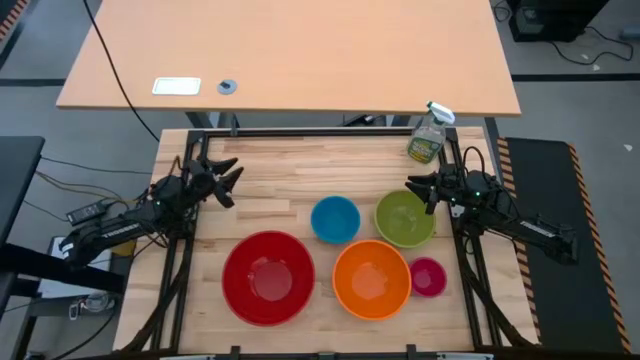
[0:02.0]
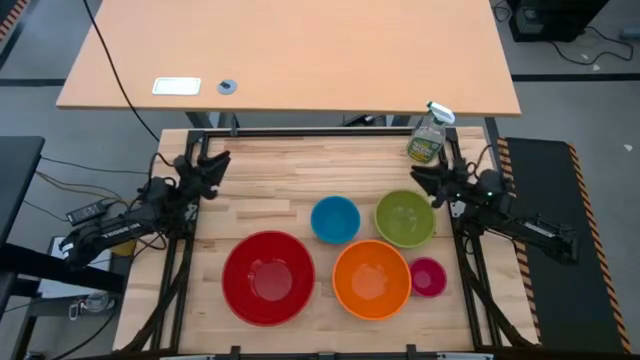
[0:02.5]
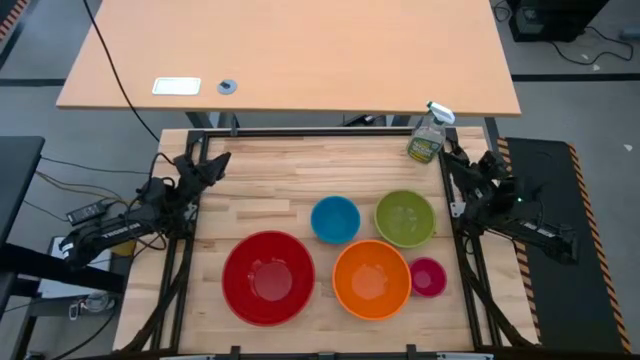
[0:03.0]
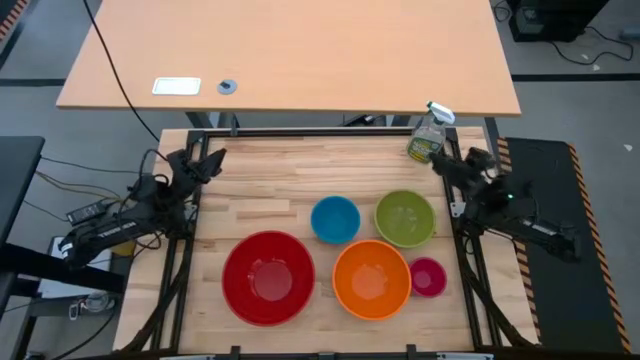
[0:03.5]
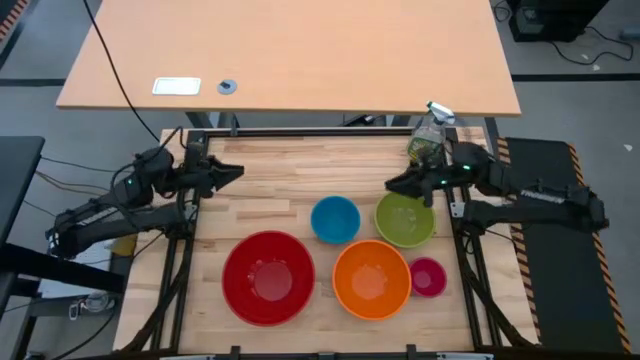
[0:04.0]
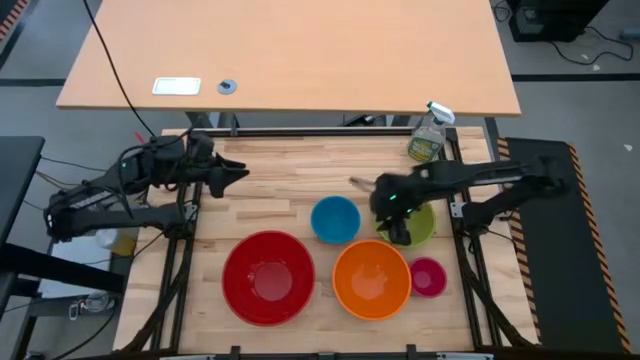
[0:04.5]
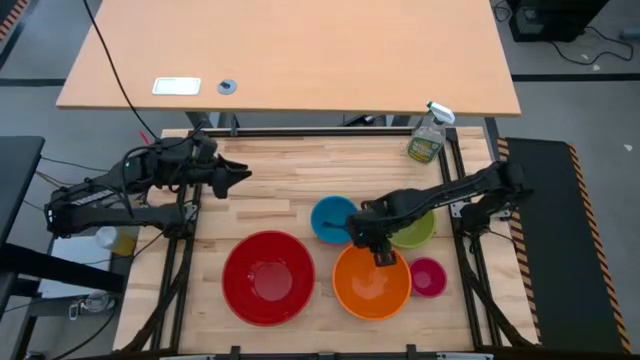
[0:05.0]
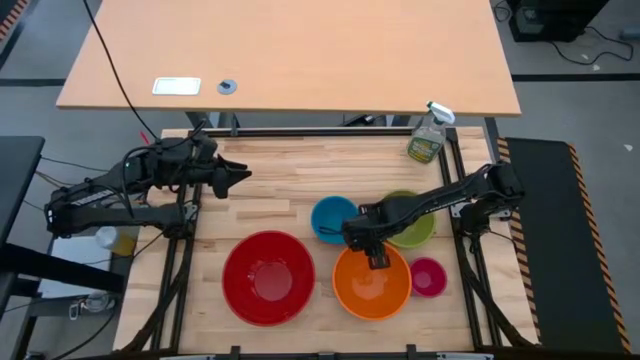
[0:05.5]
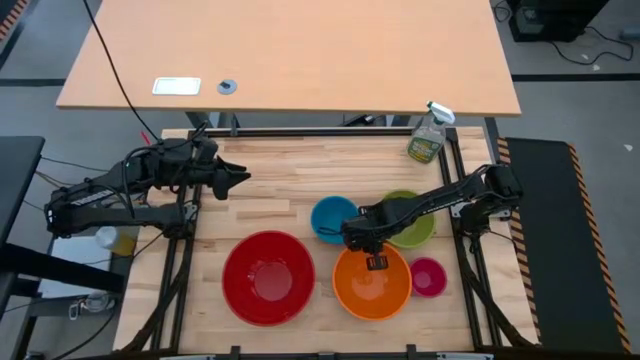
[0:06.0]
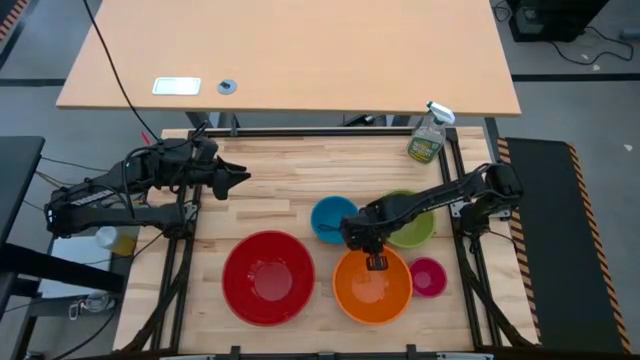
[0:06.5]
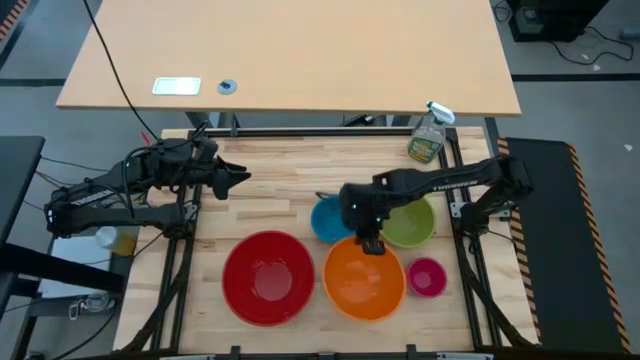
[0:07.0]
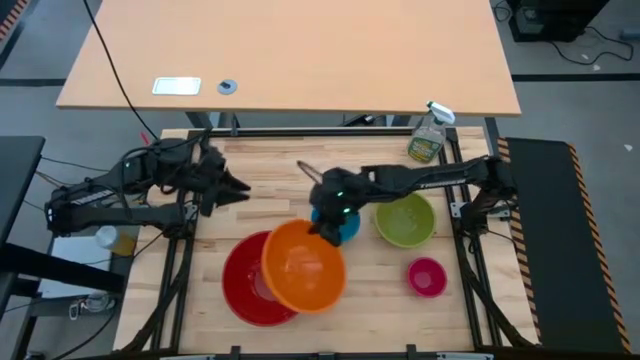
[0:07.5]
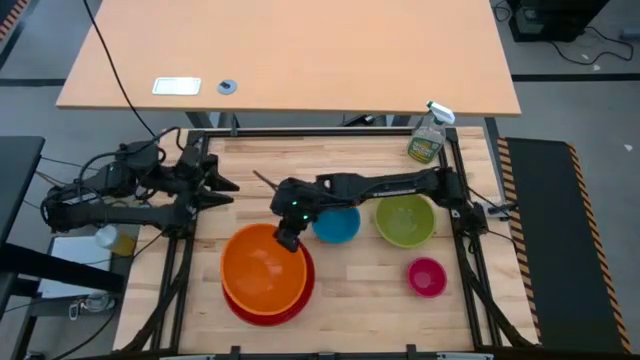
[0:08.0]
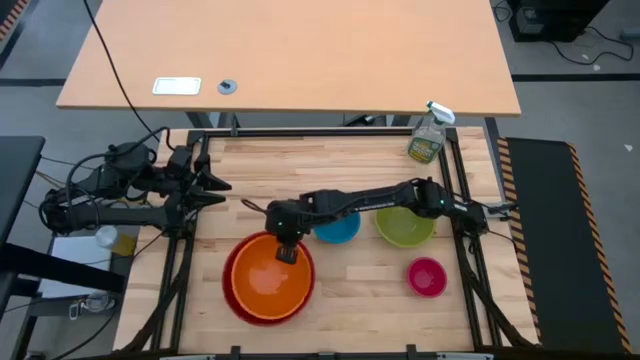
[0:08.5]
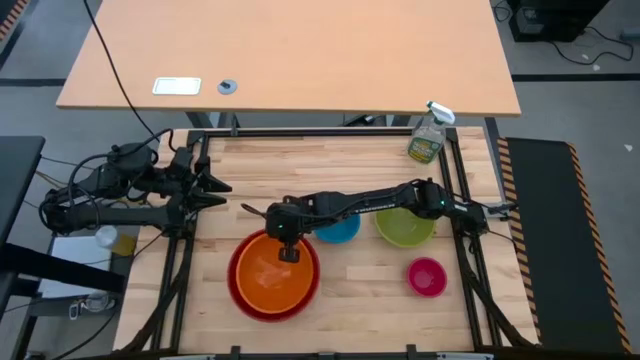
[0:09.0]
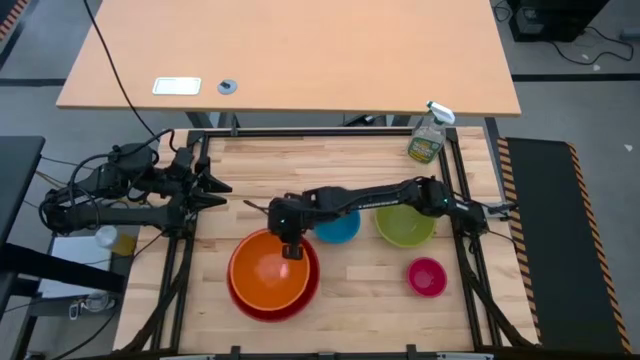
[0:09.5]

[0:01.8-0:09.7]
Stack the orange bowl into the large red bowl

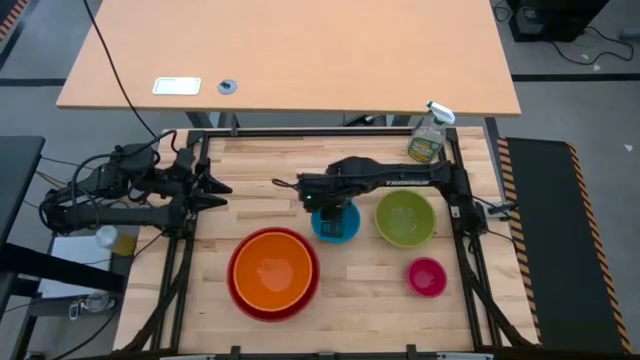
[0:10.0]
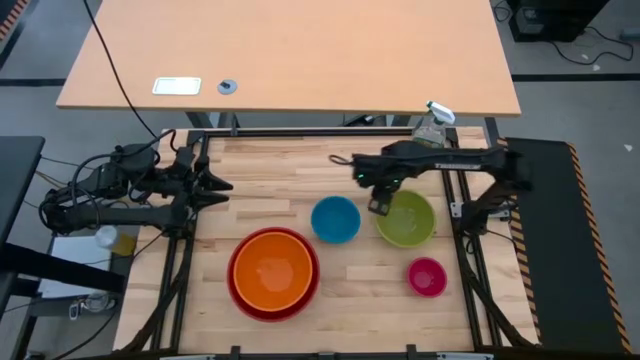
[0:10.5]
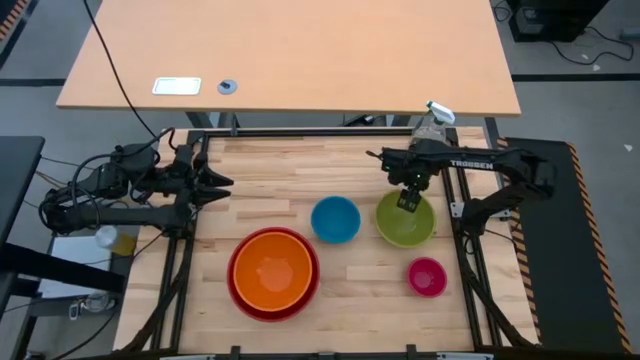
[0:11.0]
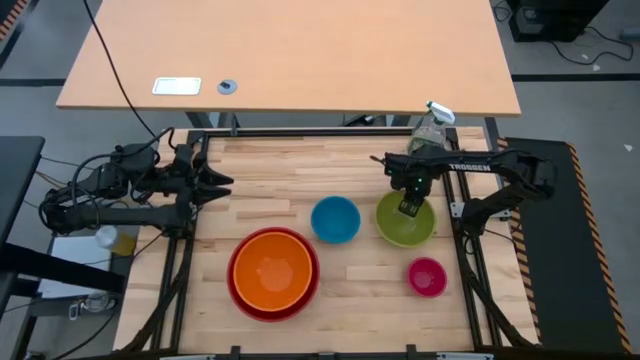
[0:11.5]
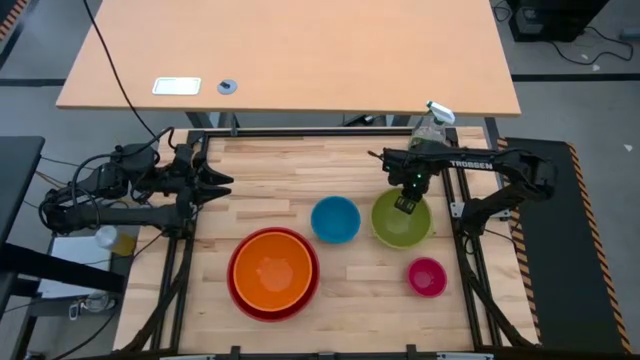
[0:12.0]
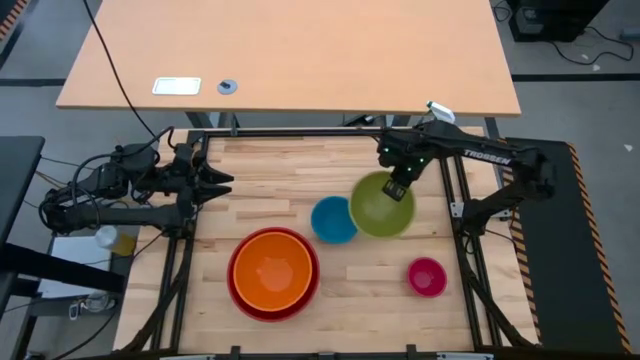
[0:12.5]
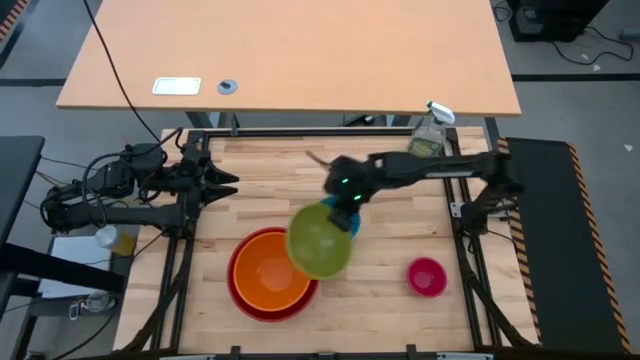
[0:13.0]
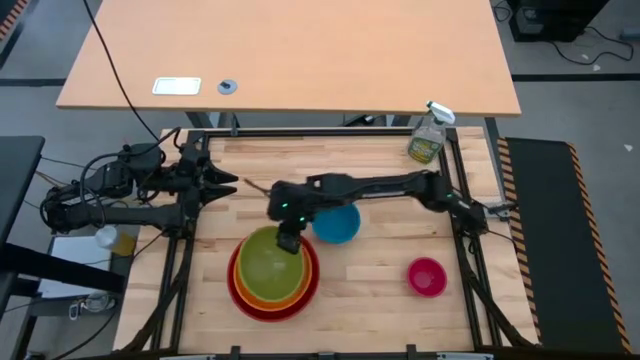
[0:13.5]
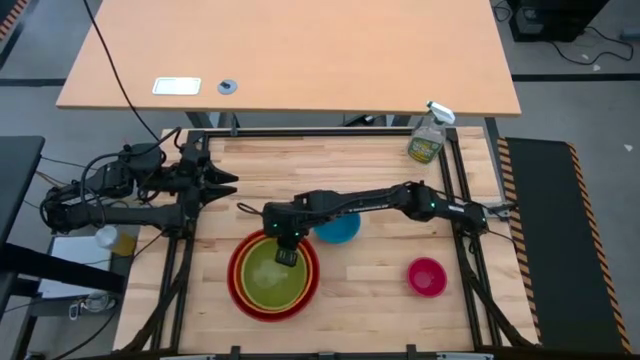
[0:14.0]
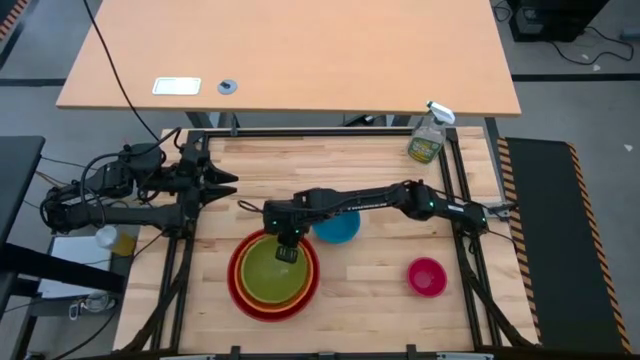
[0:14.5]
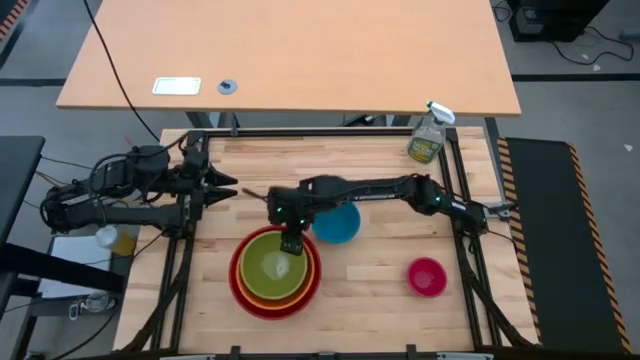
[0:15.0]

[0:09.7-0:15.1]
Stack the green bowl into the orange bowl

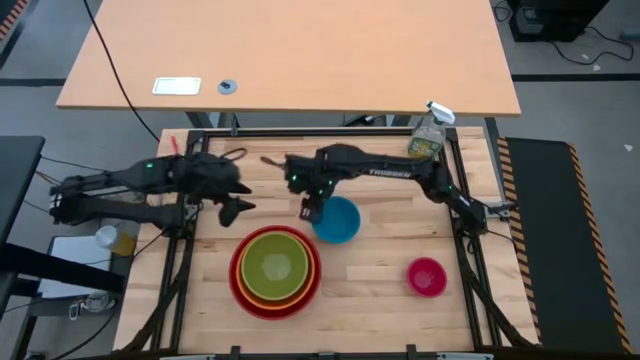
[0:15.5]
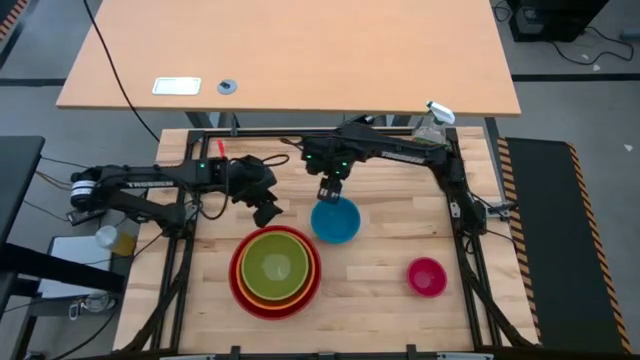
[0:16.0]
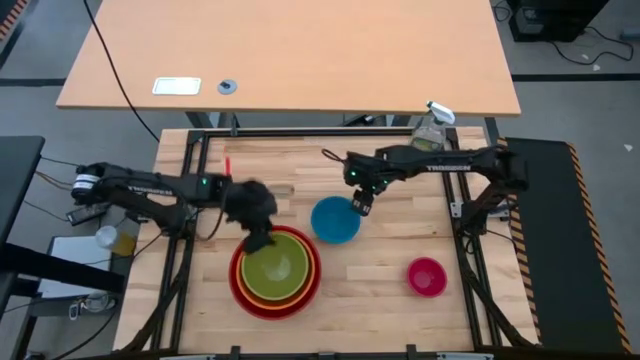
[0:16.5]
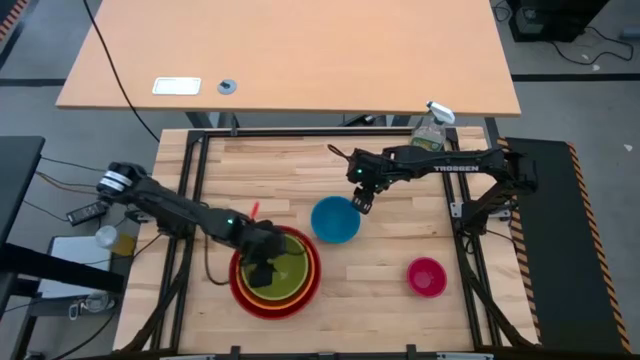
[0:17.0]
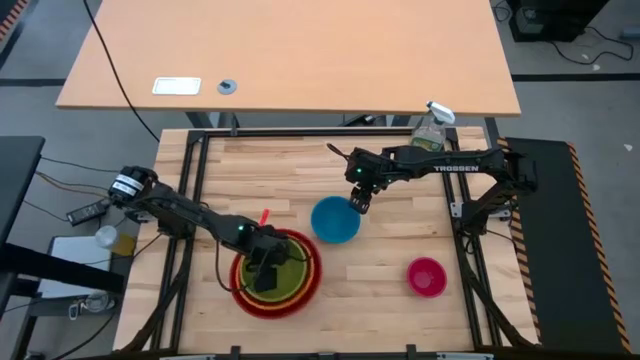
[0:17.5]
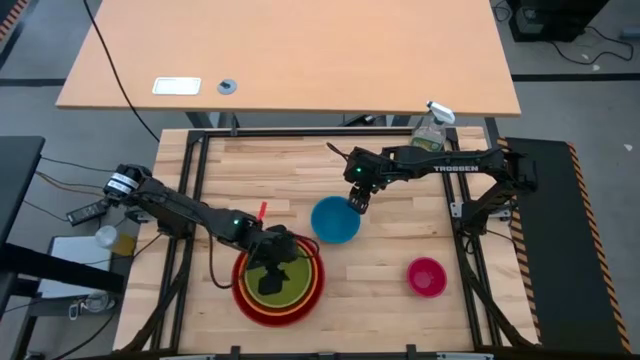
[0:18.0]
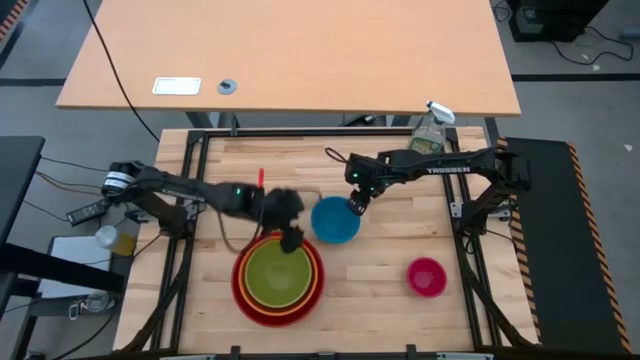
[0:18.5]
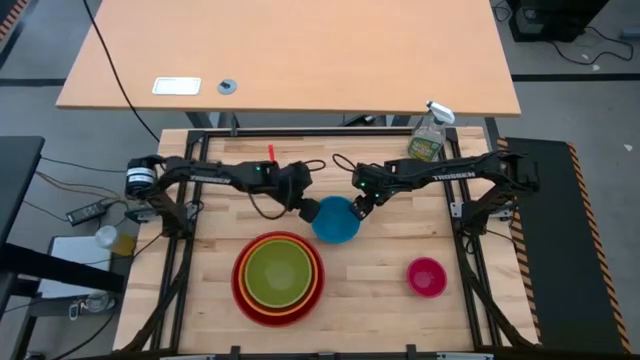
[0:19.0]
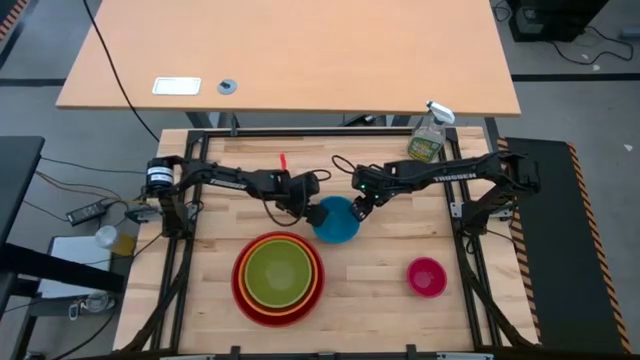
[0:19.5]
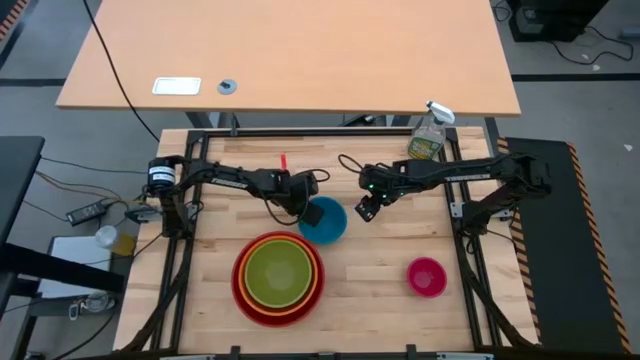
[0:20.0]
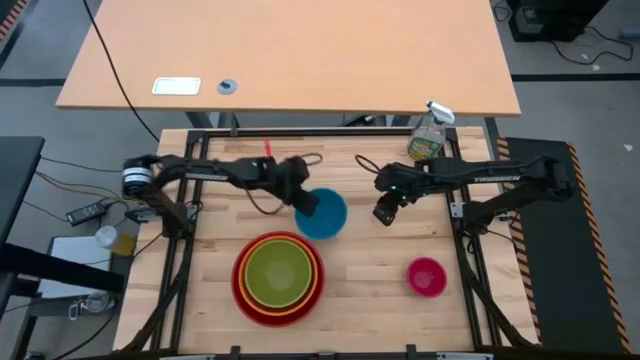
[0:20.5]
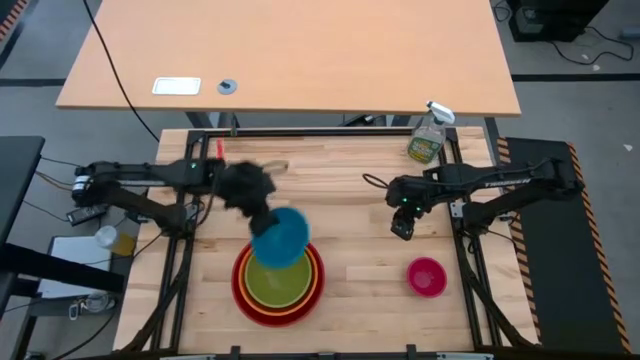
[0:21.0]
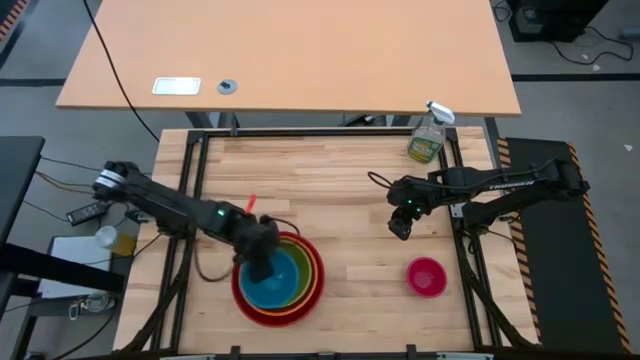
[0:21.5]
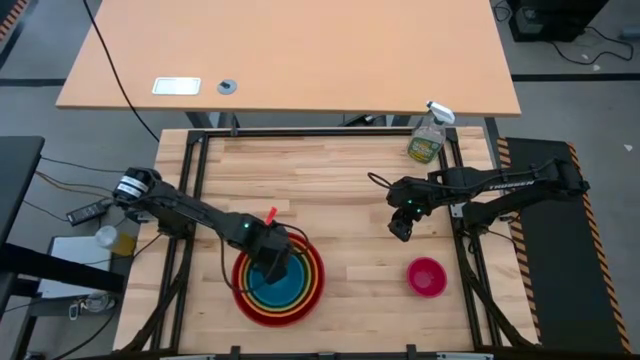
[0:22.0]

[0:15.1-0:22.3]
Stack the blue bowl into the green bowl
